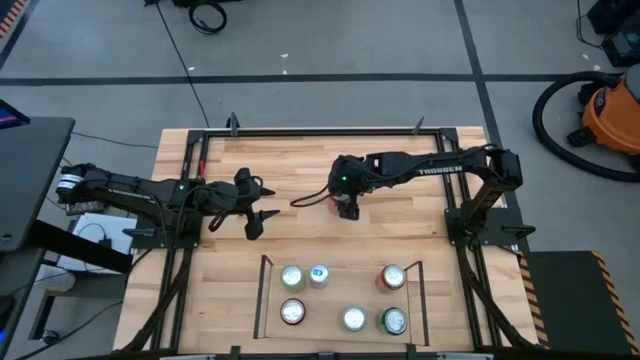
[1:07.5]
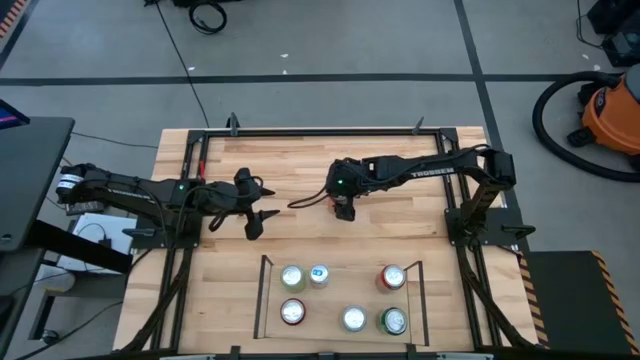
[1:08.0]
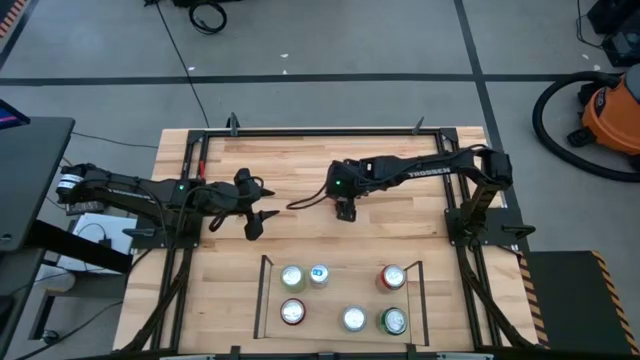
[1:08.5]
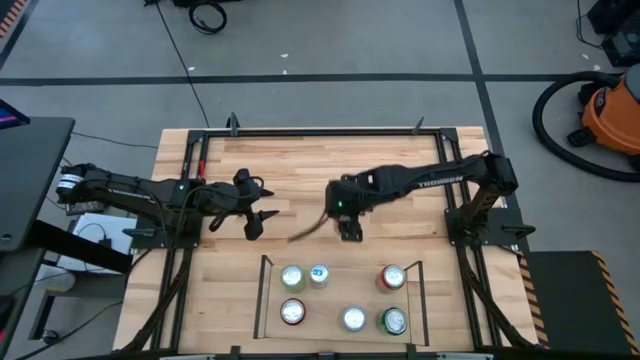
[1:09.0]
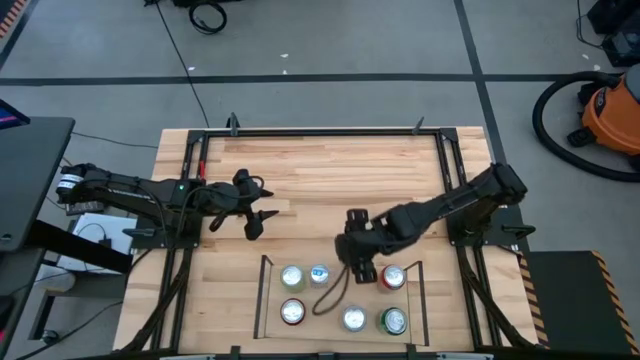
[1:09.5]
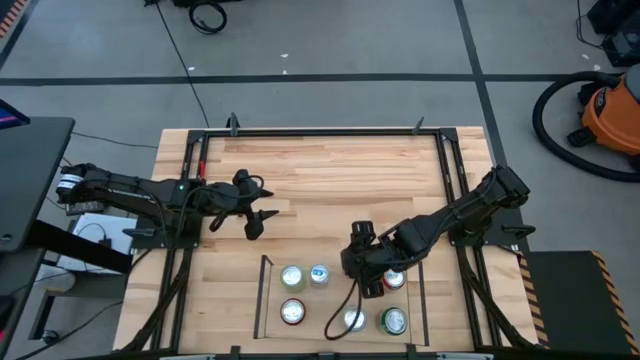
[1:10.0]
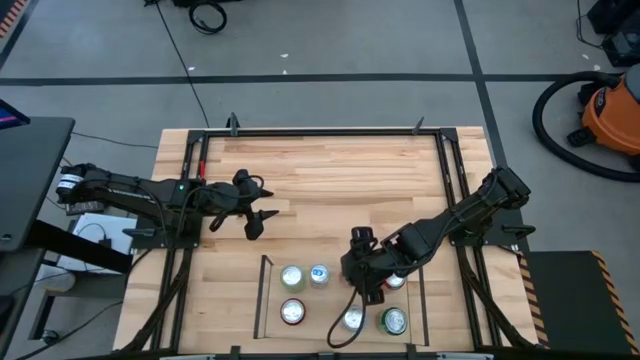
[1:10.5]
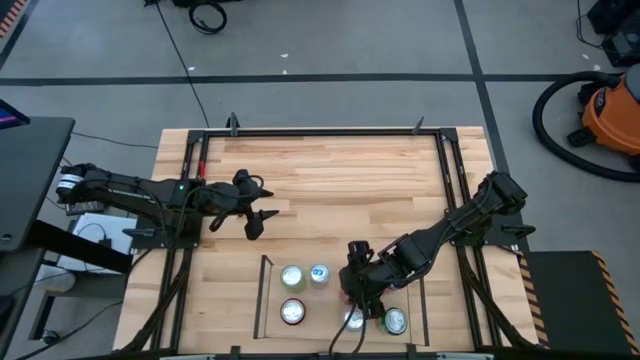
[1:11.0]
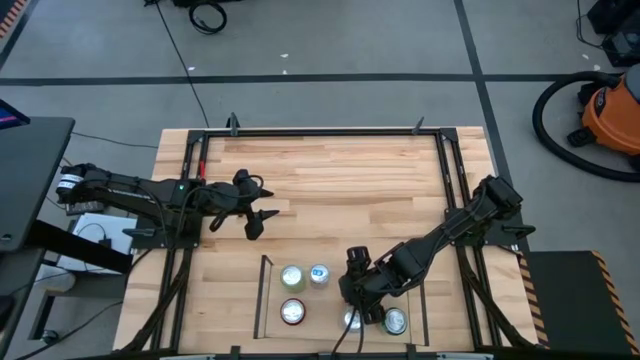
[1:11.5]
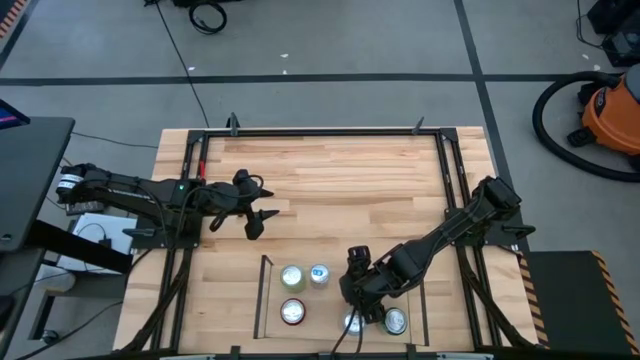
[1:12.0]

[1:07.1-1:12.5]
Task: Place canned beverage on shelf
Put the orange soda can on the shelf

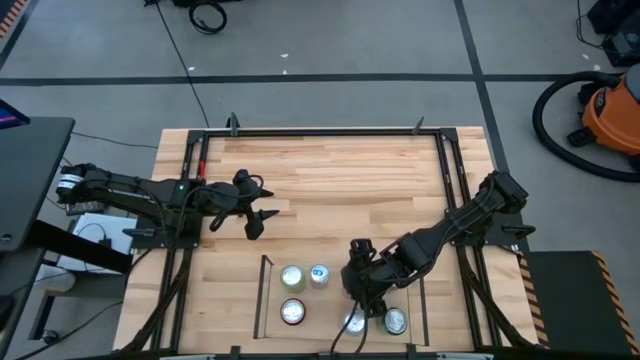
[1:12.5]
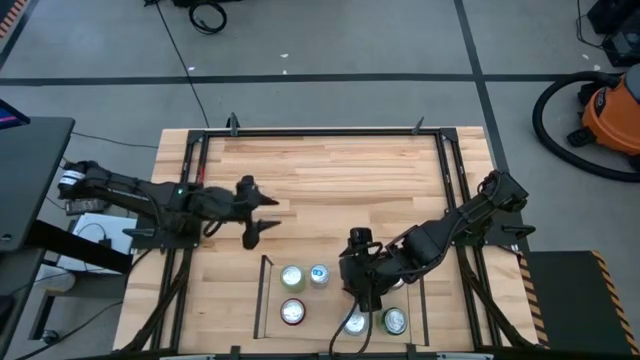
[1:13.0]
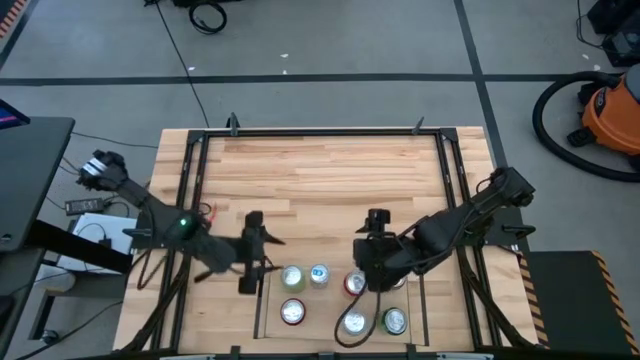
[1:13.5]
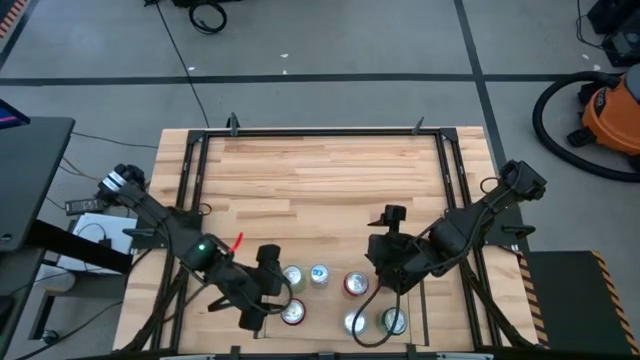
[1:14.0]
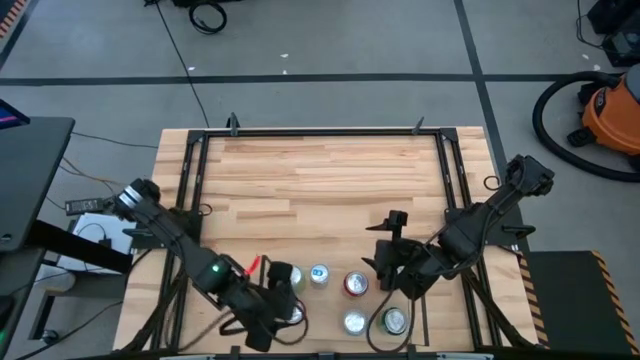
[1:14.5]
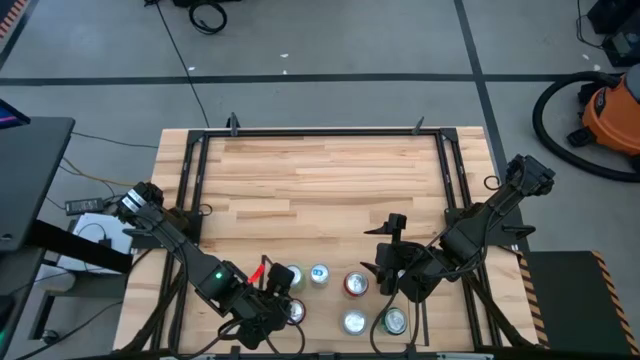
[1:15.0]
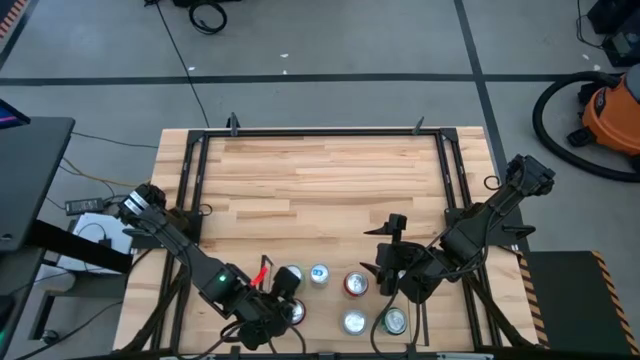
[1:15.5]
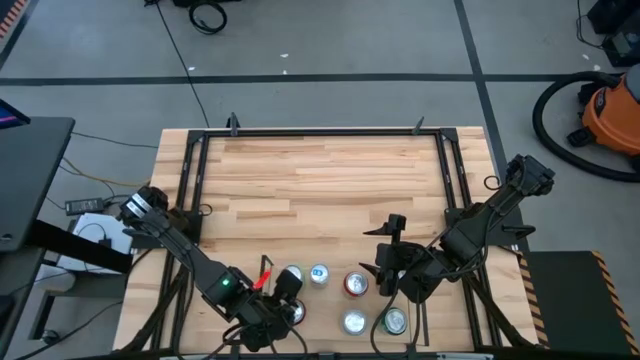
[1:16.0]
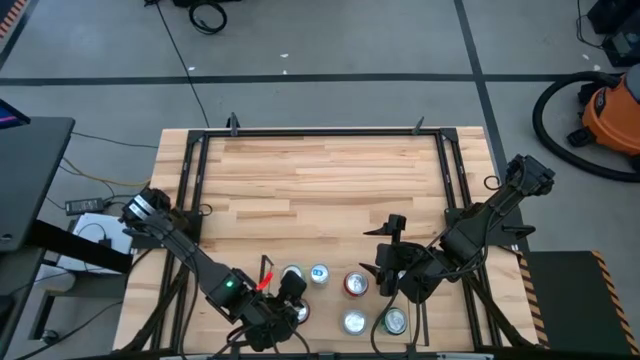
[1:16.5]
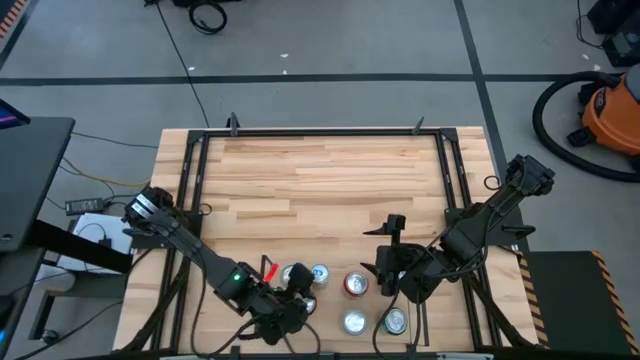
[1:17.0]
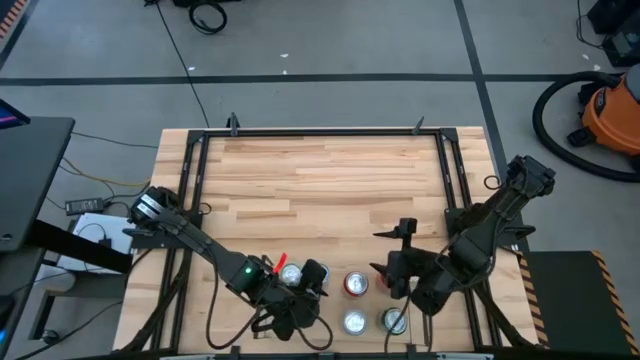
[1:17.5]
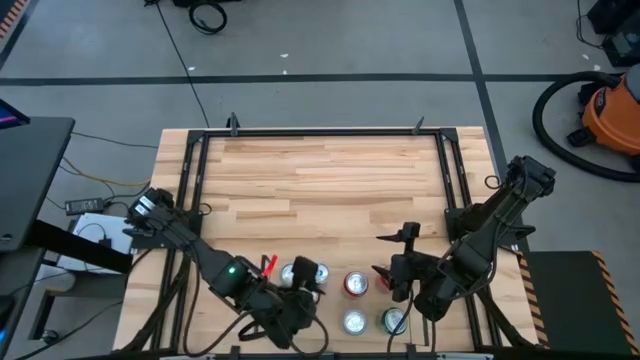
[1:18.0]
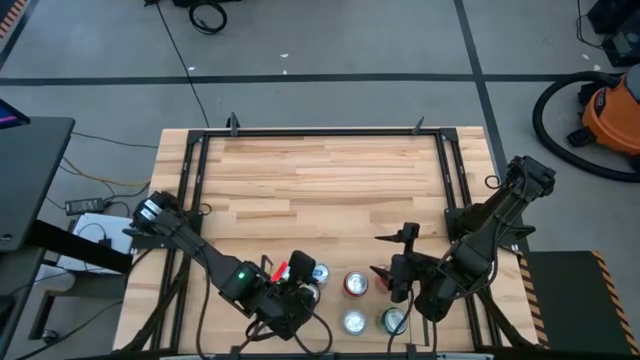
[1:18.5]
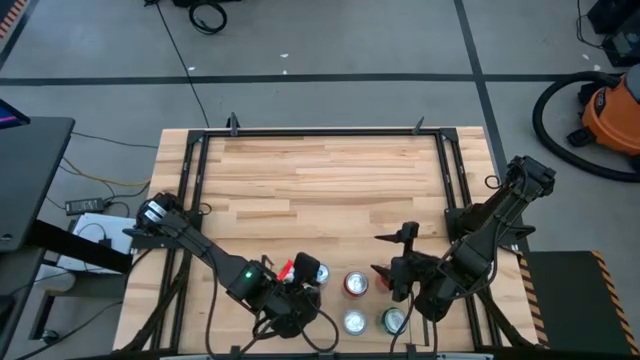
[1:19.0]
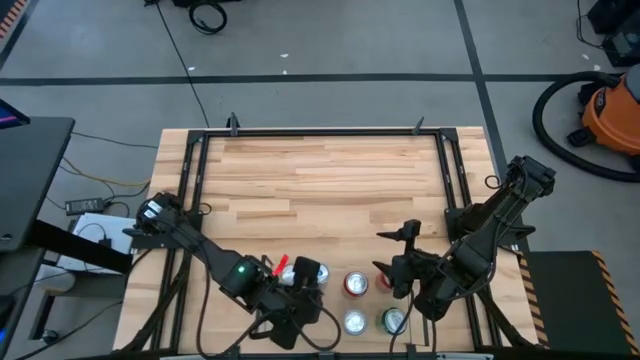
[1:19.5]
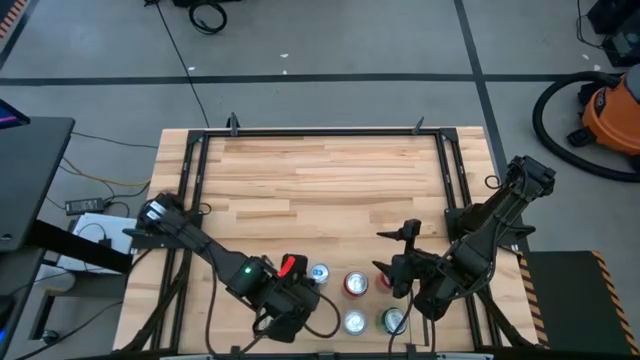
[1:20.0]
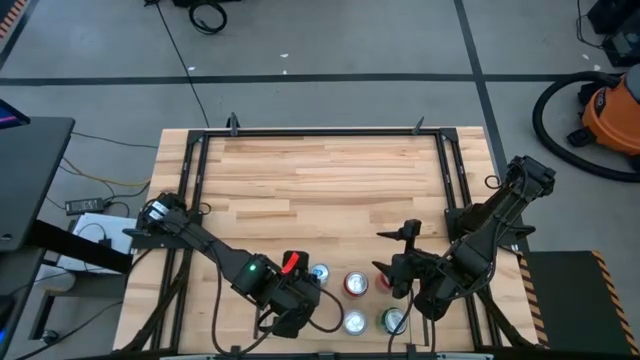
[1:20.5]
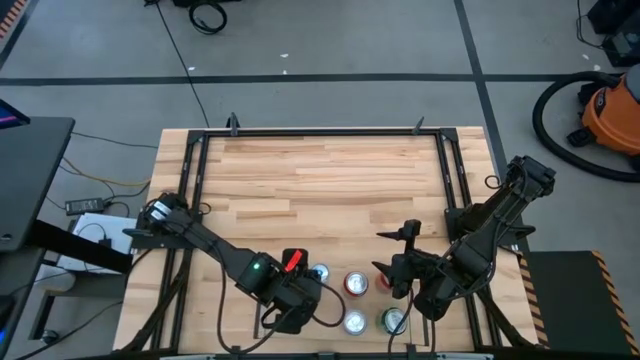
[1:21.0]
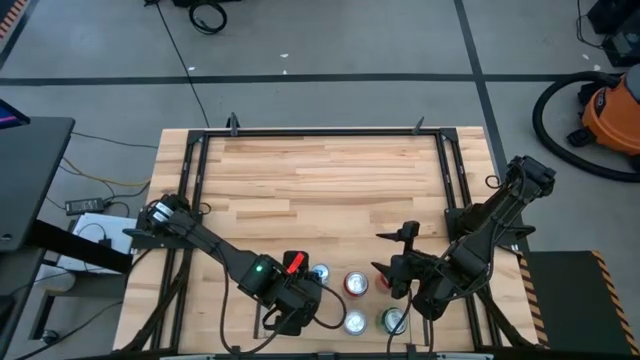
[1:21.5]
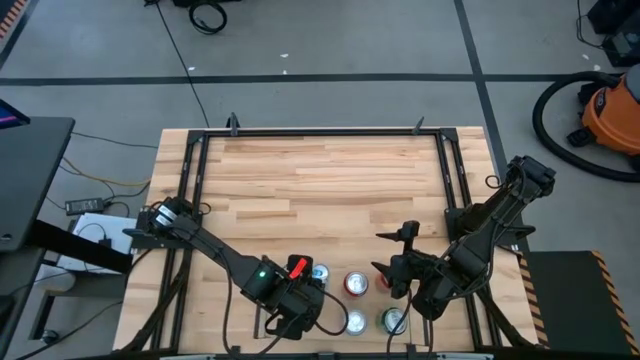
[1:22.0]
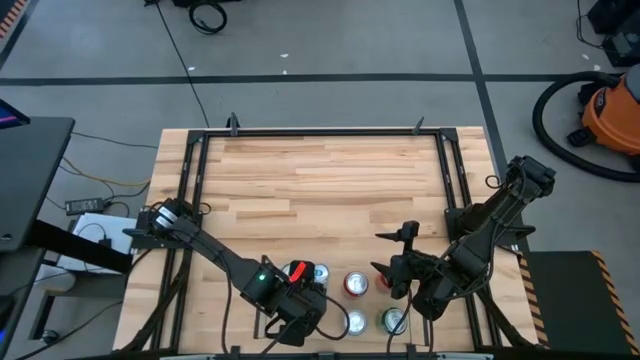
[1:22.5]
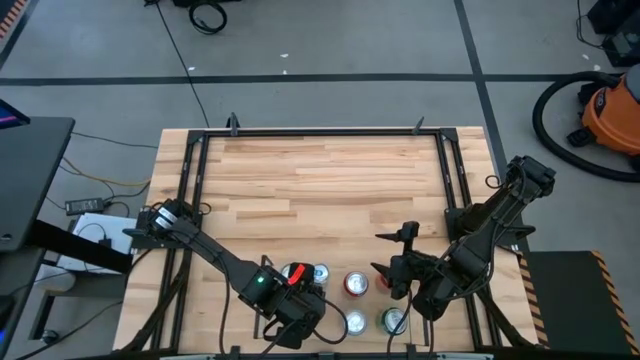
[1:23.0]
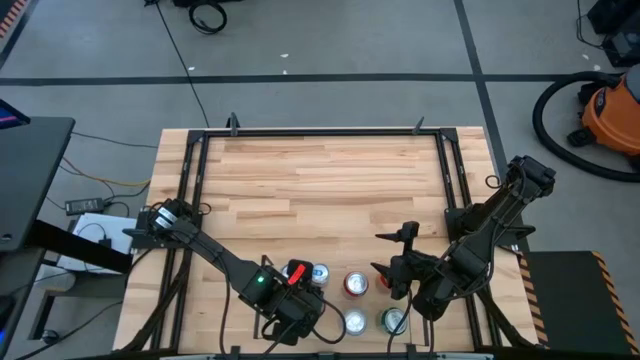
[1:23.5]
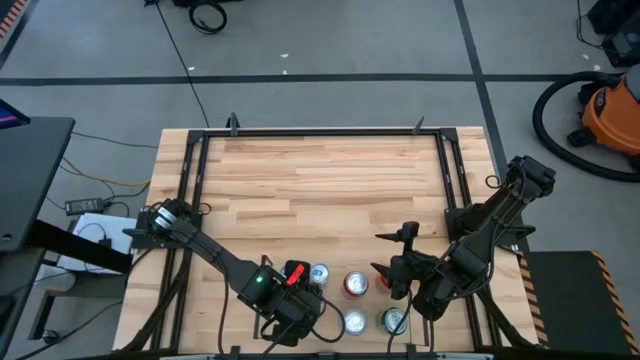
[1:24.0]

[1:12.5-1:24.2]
Adjust the red black soda can on the shelf

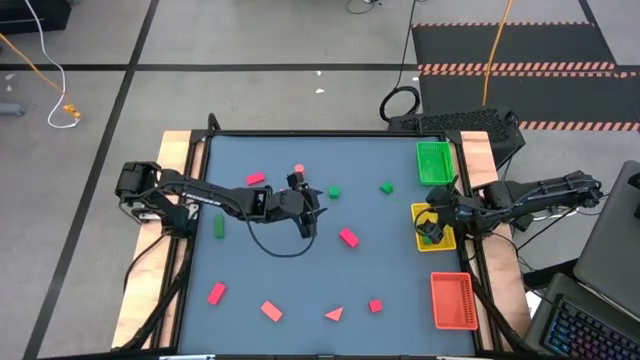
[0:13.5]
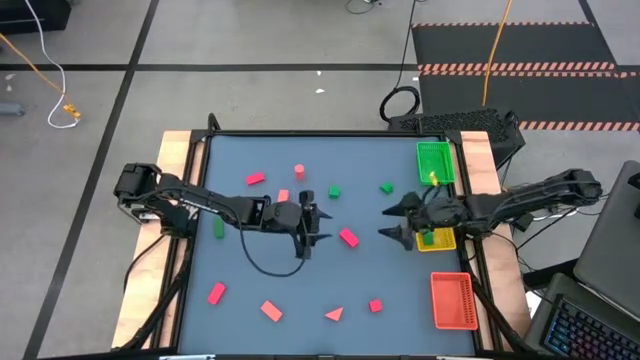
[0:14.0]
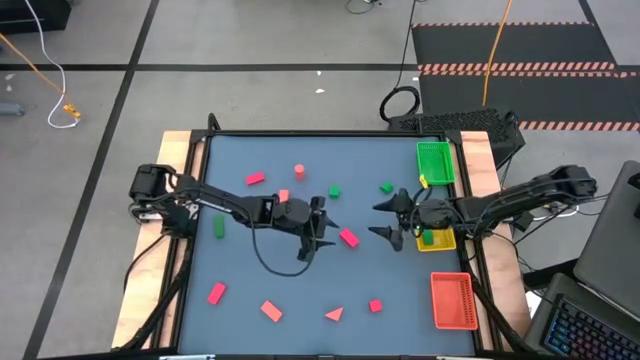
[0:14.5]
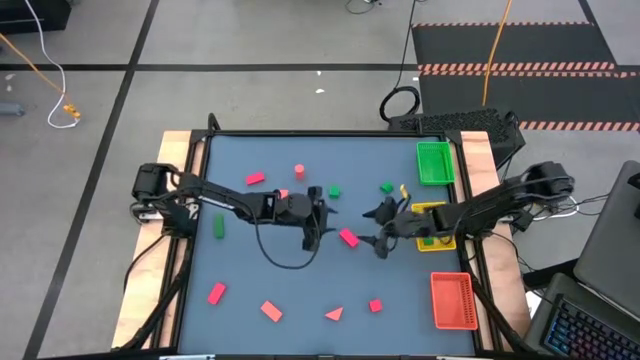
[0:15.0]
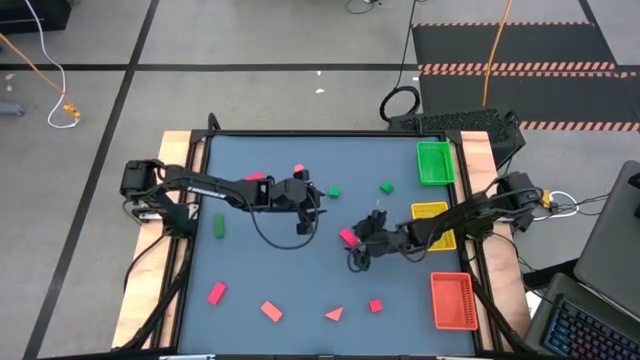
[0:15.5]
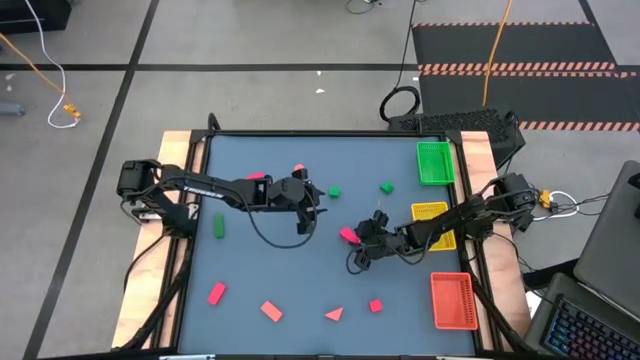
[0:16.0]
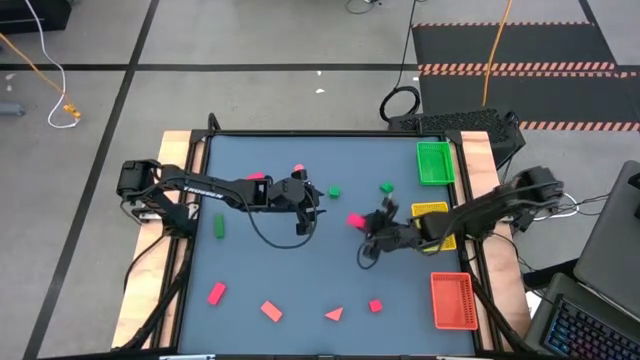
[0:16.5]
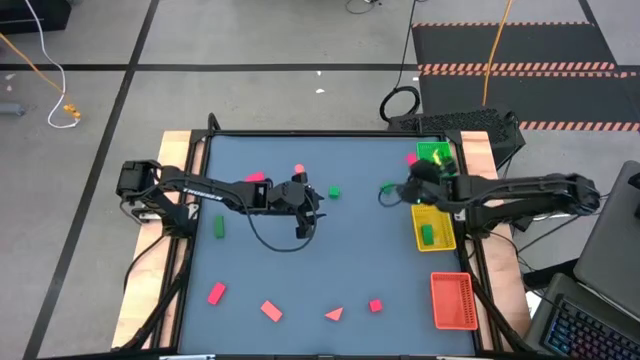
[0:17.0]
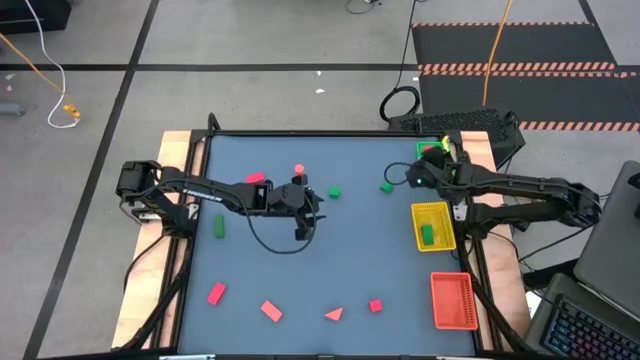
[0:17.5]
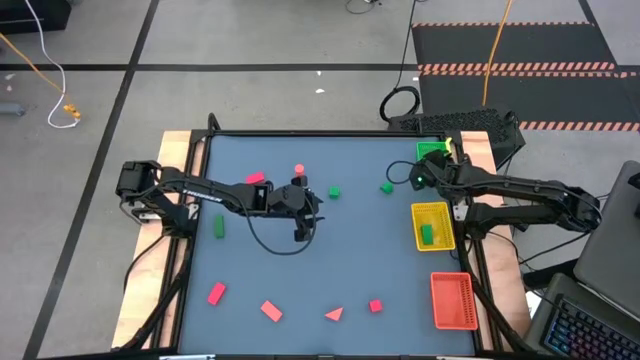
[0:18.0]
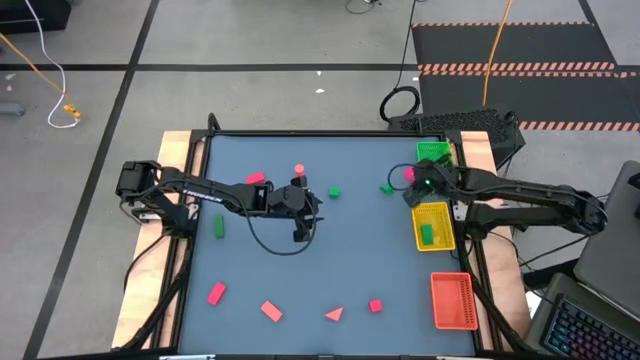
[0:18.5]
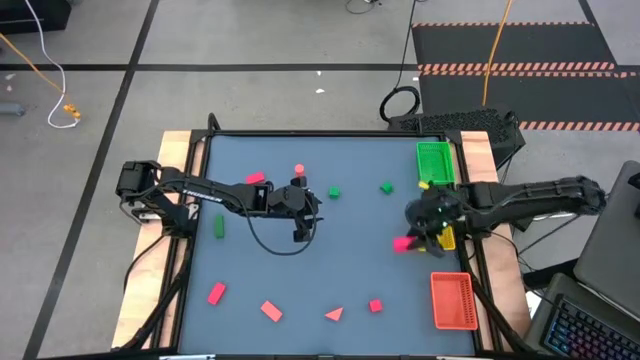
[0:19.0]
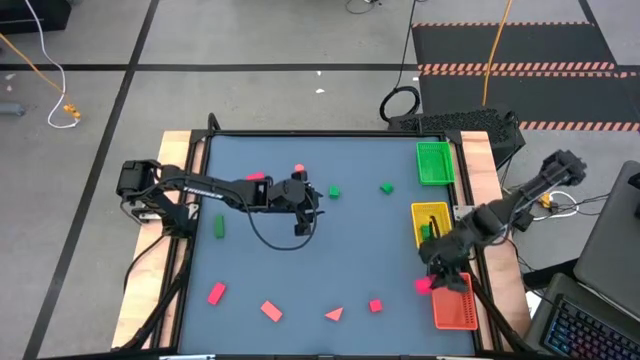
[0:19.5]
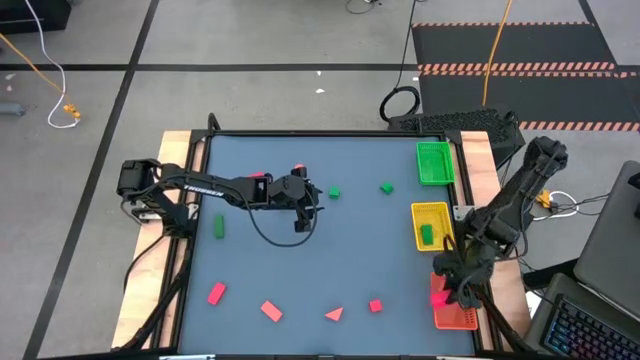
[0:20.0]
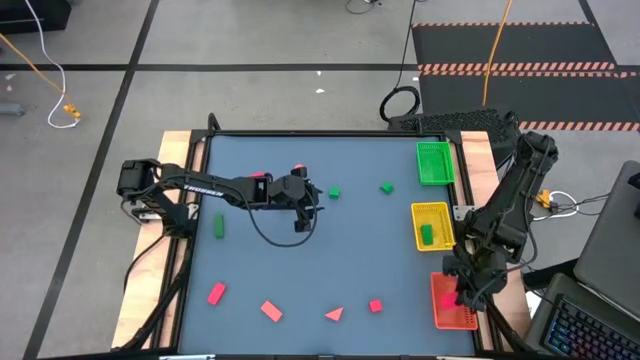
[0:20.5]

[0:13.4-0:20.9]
Task: Sort & place blocks by color
Put the top right red block into the orange basket
